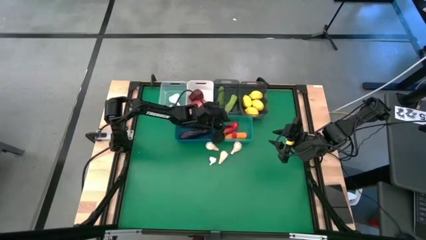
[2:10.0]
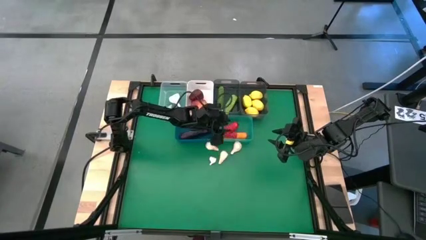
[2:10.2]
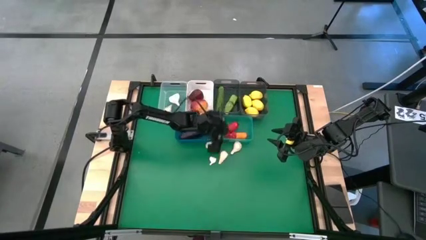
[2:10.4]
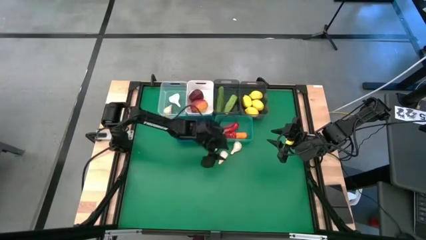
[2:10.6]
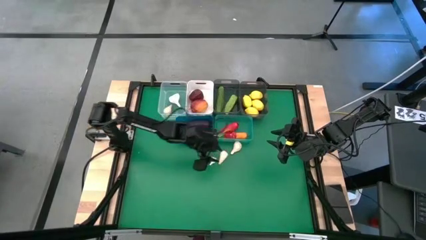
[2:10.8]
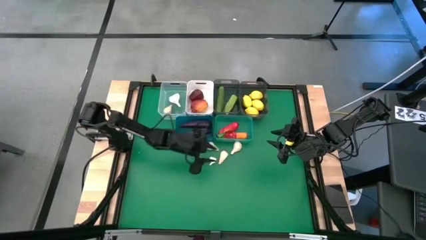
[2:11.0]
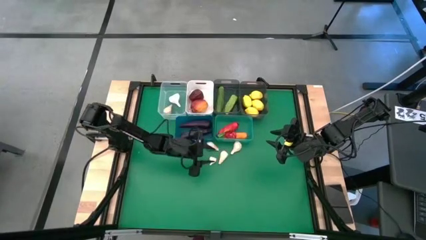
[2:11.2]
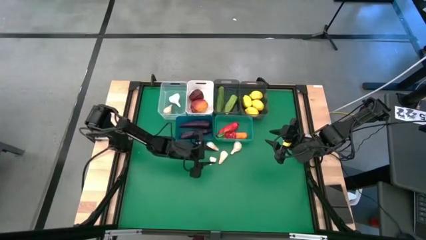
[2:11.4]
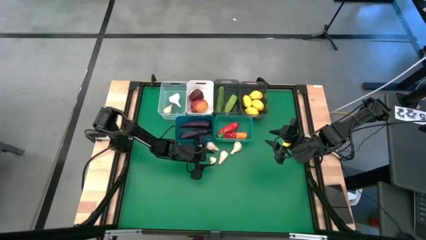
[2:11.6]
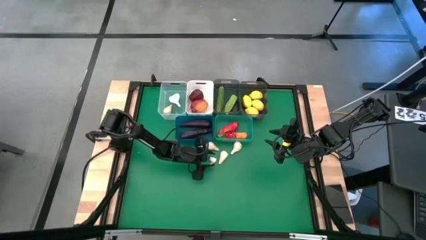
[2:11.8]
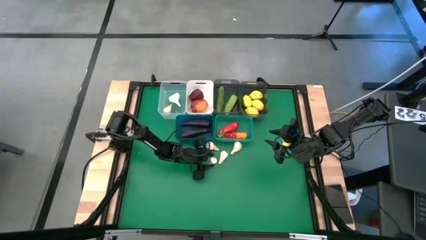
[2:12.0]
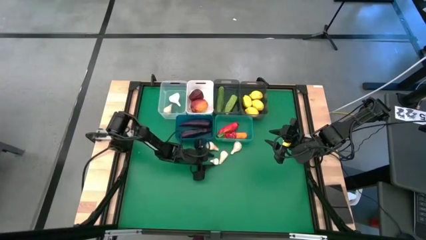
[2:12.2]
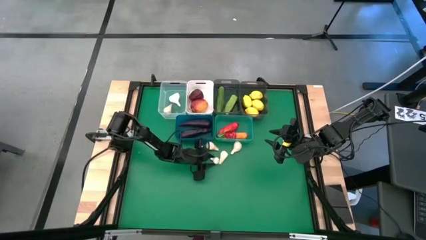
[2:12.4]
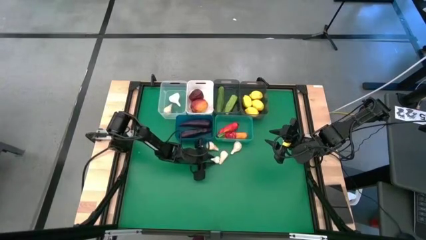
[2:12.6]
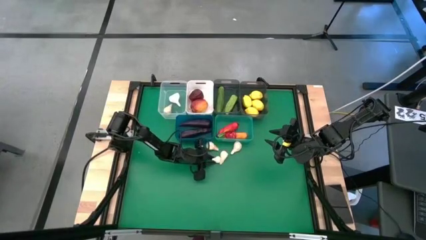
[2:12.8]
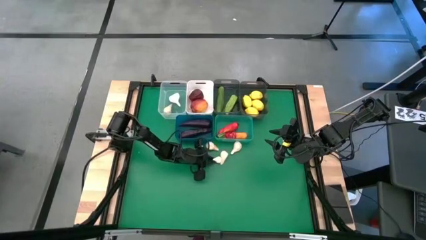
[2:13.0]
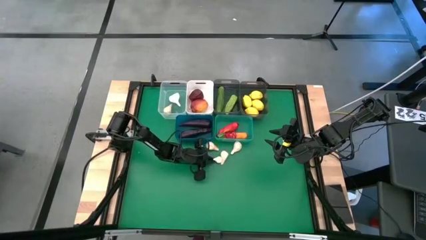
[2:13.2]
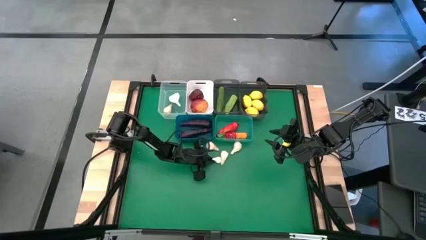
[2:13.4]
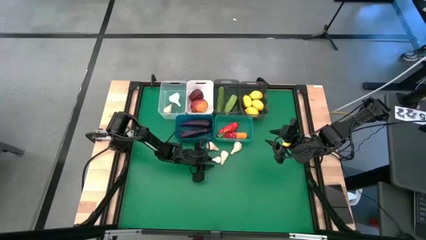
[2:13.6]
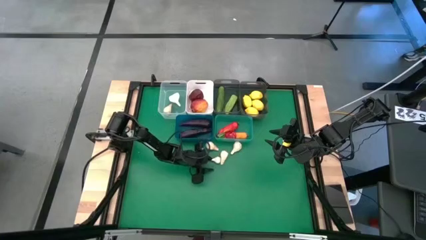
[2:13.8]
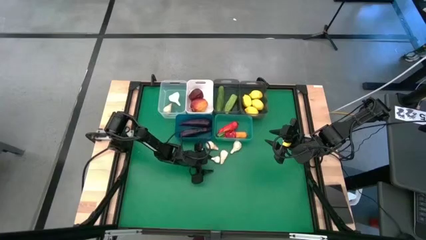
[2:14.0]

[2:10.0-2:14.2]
Task: Sort produce into baskets
Put the garlic into the transparent bin

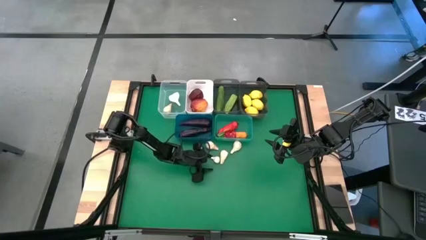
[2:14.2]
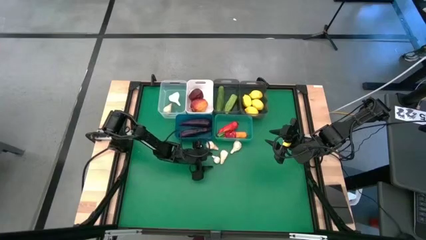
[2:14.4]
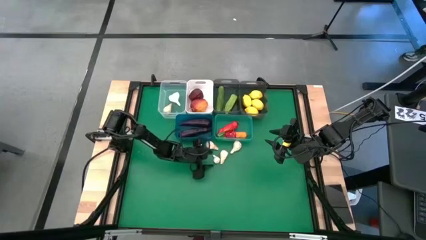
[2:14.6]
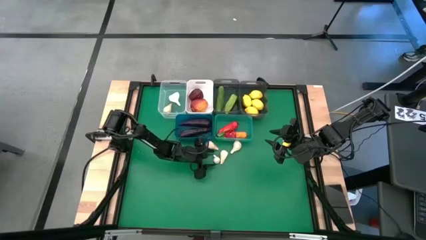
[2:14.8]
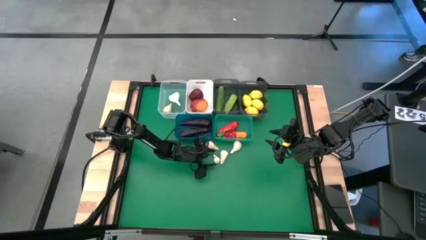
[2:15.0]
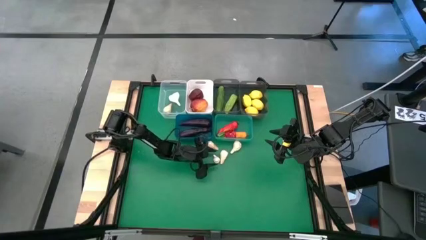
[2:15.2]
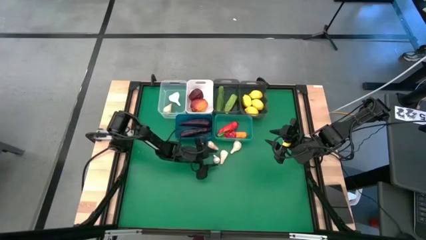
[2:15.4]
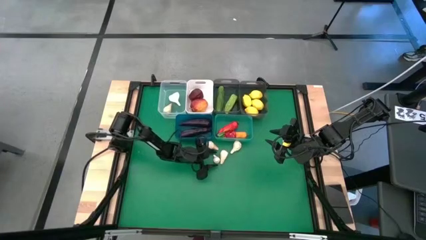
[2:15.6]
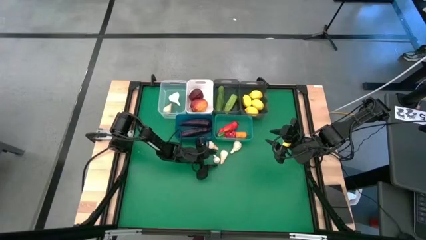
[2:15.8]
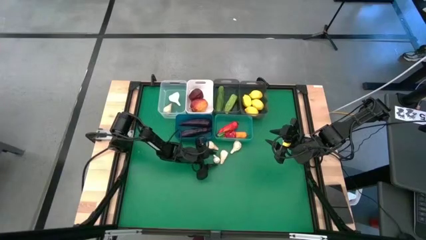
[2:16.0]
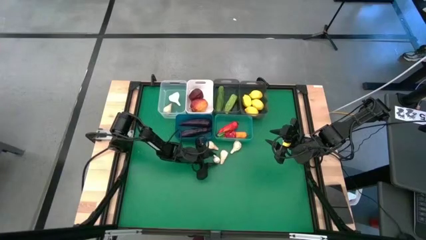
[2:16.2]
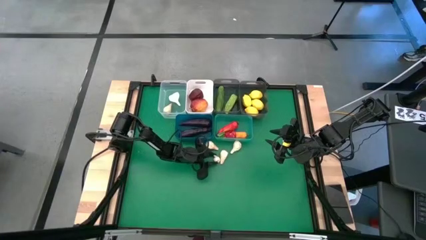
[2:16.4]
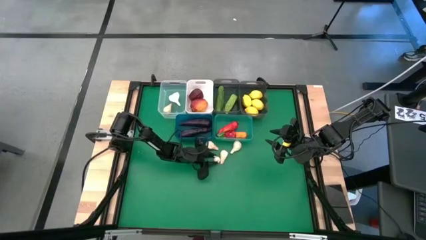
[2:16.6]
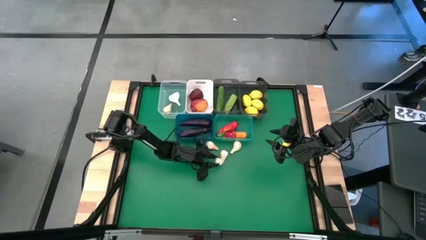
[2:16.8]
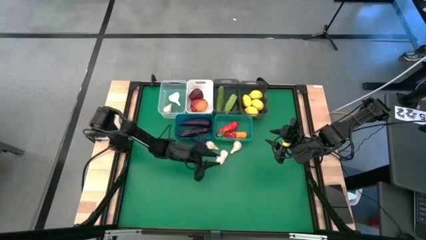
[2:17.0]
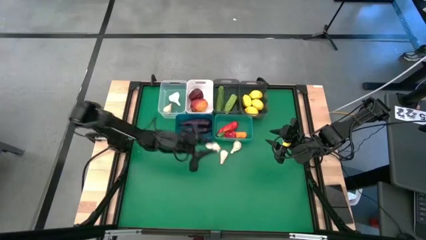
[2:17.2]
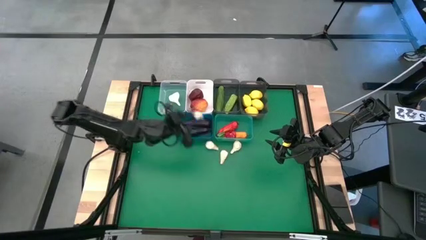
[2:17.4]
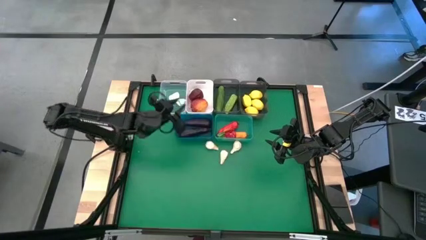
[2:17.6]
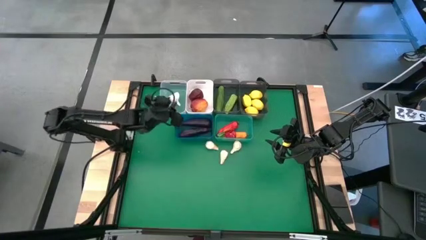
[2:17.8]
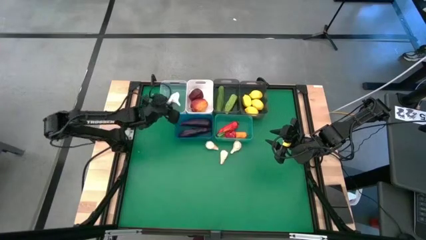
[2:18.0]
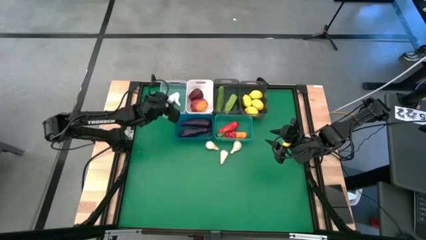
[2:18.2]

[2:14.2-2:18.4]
Put the garlic into the transparent bin

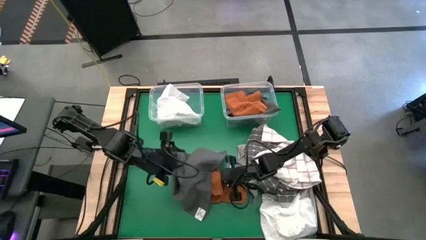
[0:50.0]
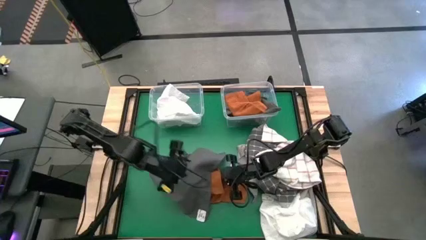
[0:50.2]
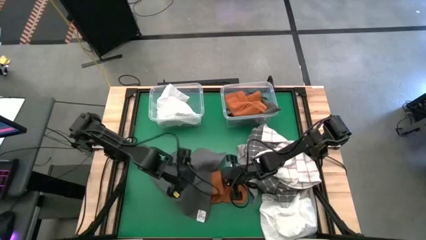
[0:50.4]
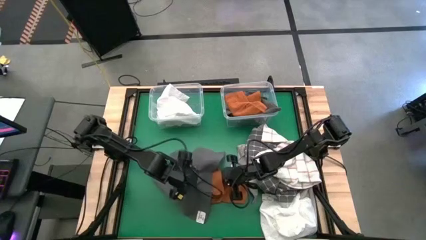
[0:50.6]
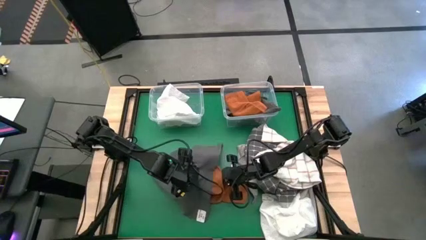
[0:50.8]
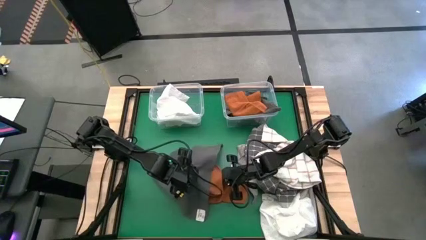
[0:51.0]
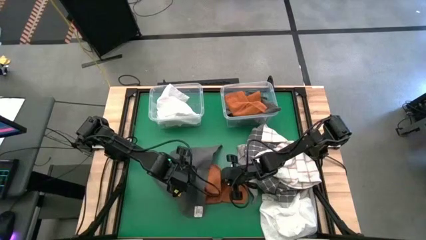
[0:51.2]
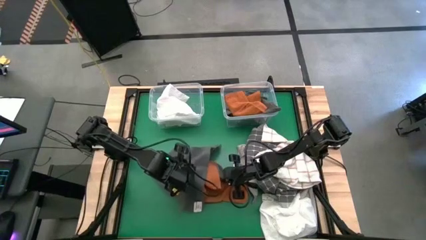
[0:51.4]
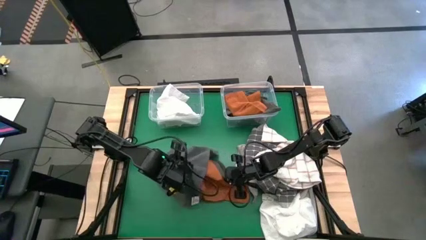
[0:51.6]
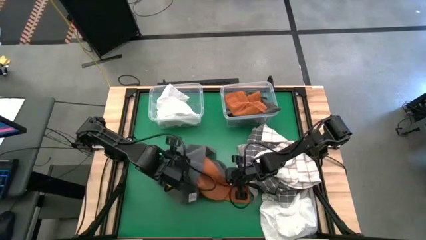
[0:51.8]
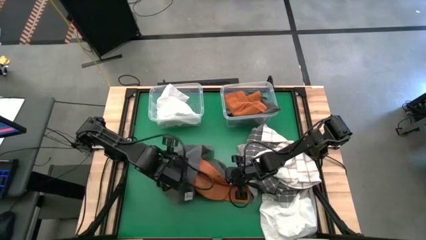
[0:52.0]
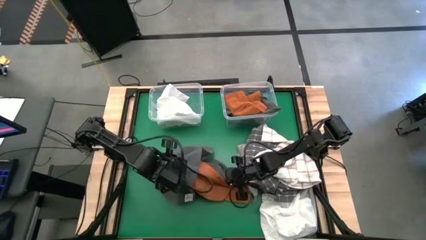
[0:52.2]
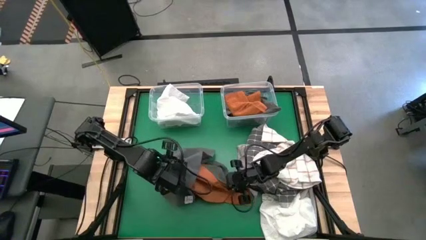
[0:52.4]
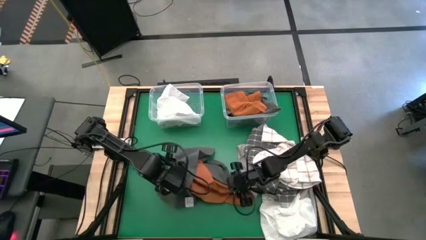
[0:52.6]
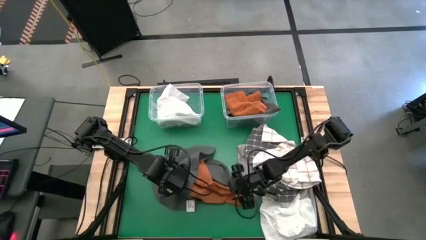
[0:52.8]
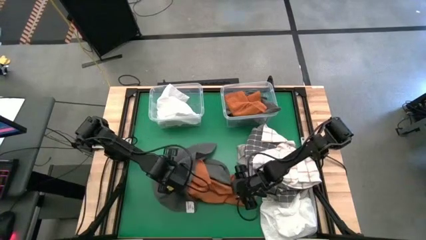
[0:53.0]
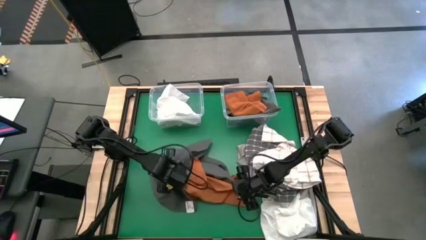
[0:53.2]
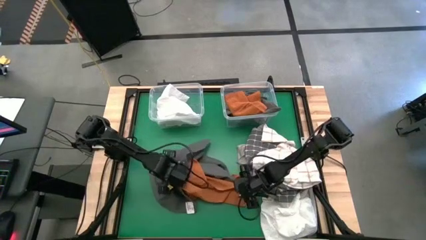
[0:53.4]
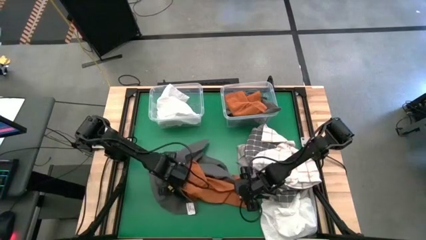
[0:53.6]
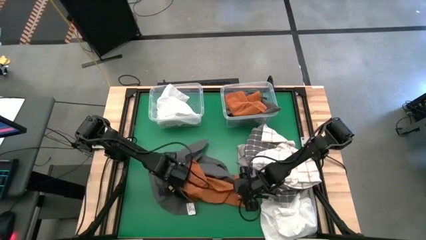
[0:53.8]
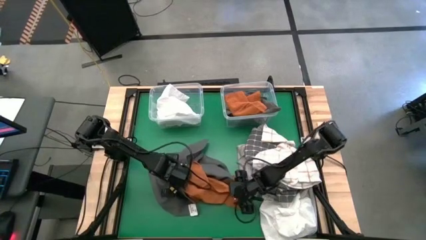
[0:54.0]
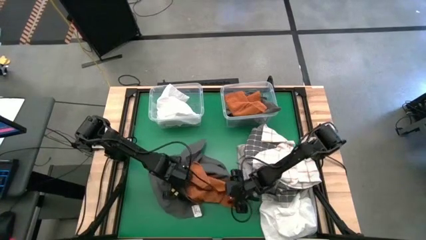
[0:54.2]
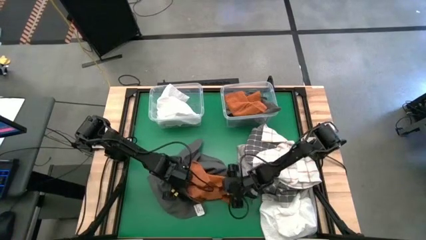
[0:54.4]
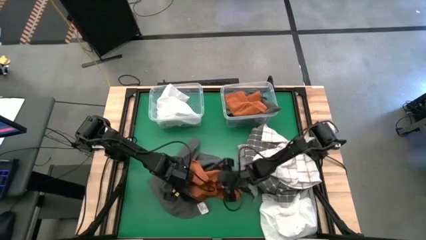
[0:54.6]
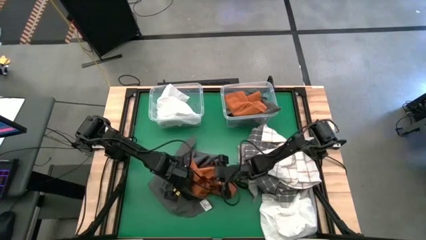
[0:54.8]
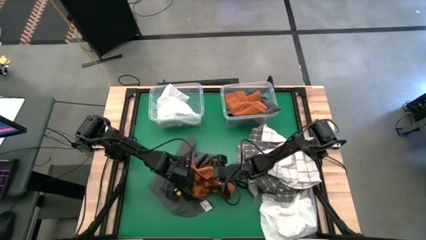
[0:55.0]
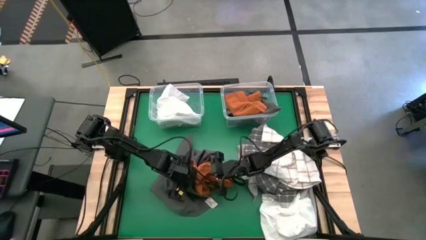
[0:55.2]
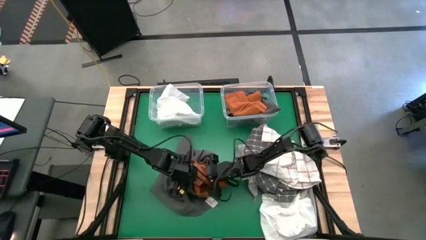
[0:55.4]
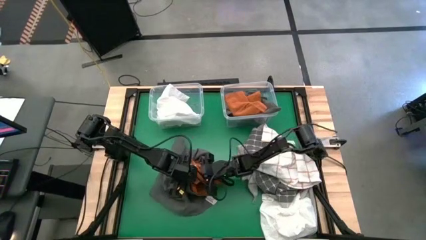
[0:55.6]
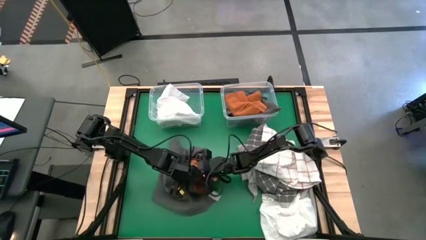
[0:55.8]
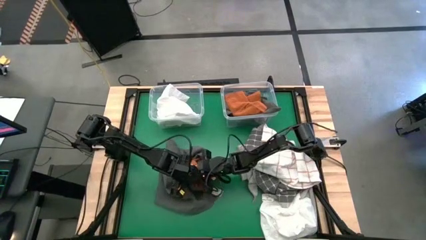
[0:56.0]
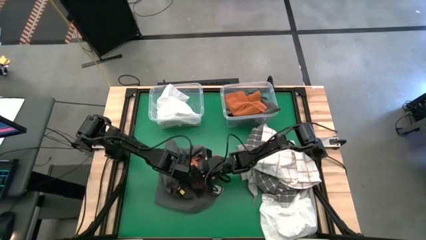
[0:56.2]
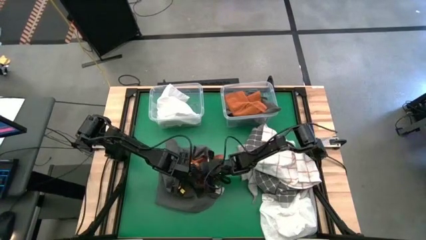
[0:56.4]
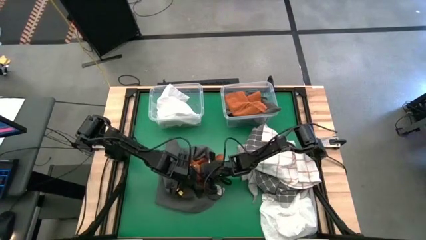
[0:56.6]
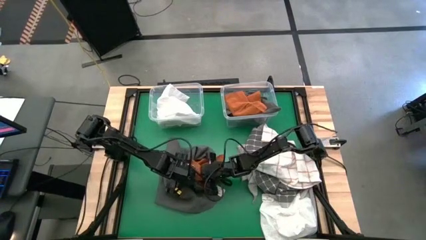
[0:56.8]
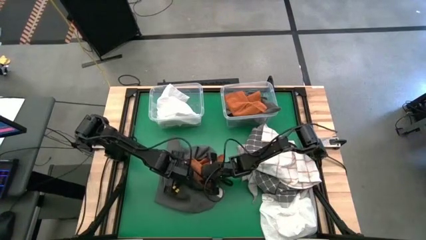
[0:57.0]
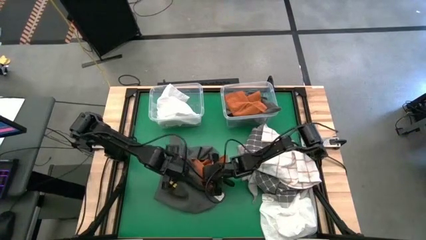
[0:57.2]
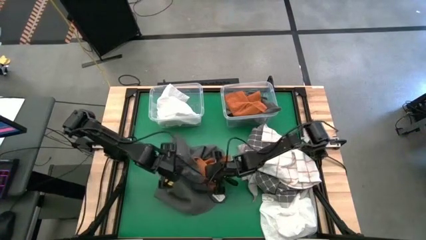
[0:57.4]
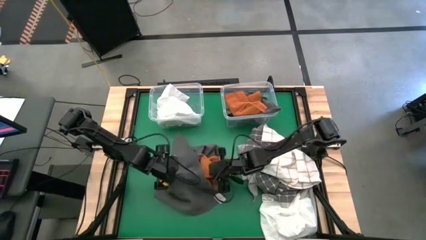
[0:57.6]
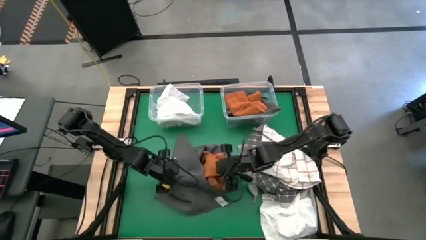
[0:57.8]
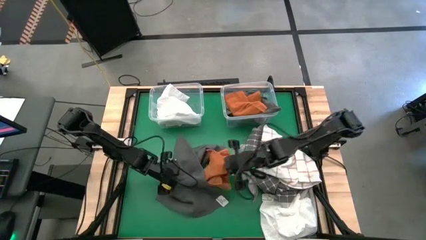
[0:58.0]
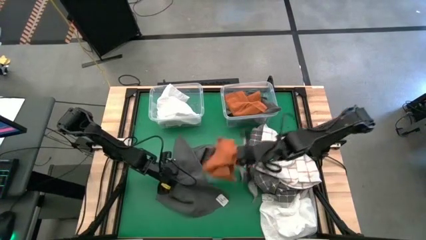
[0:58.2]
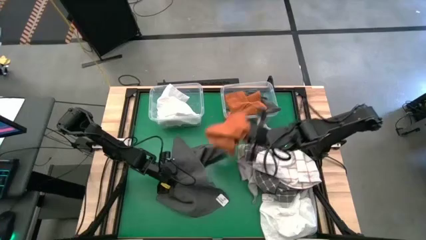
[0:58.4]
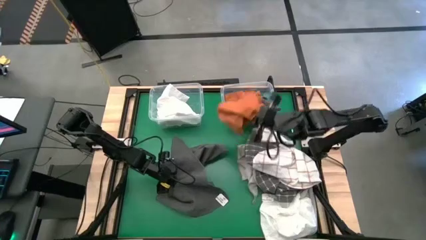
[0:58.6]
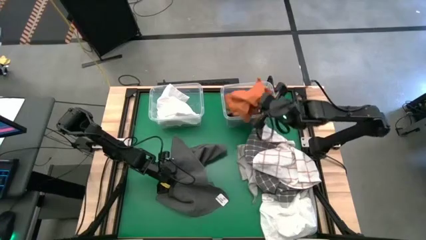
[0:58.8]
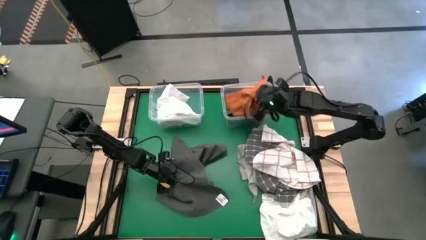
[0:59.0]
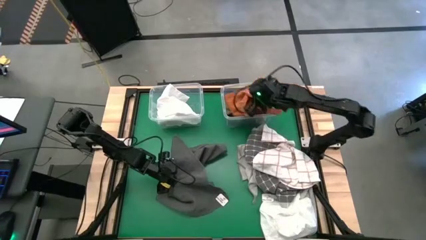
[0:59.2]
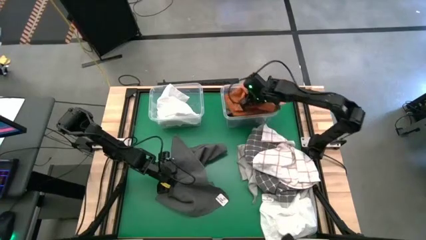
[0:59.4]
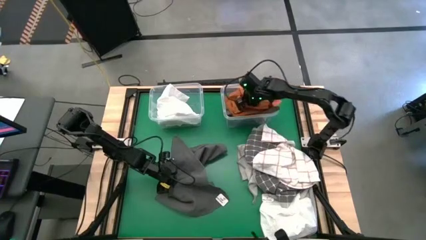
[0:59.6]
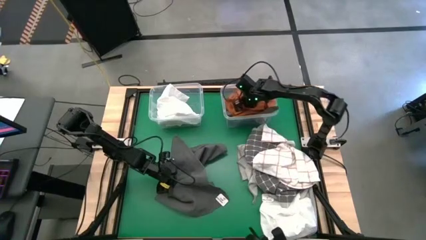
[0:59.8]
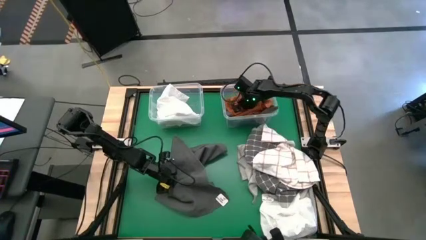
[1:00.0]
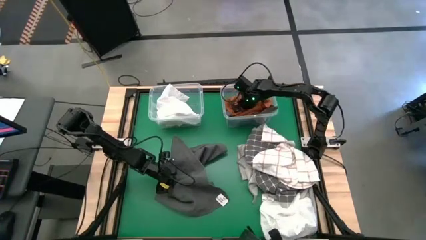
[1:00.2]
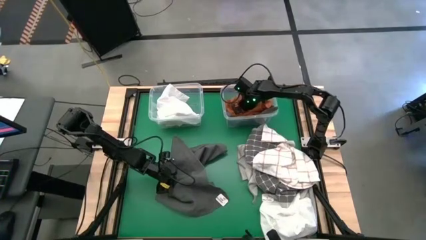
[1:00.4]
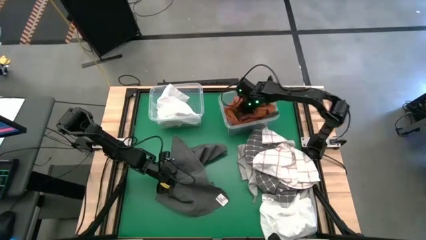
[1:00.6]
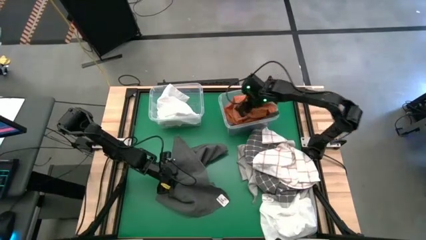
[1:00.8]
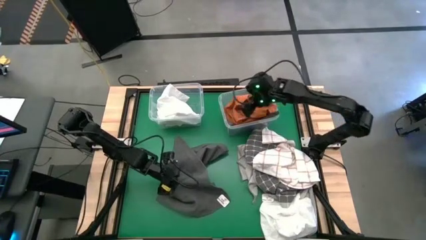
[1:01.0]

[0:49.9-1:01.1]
Task: Sort towels by color in basket
Put the orange towel into the right transparent bin
